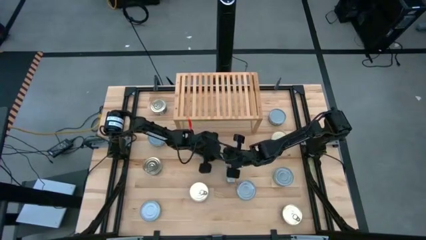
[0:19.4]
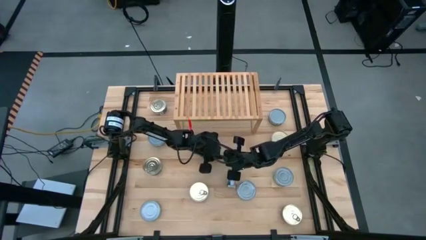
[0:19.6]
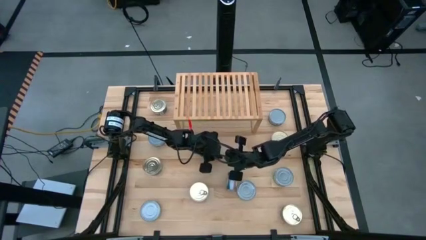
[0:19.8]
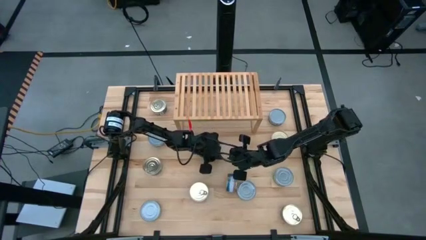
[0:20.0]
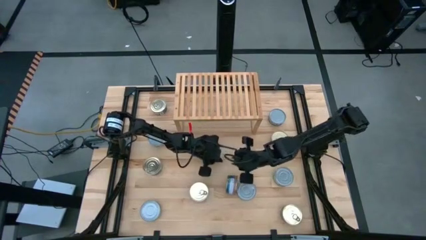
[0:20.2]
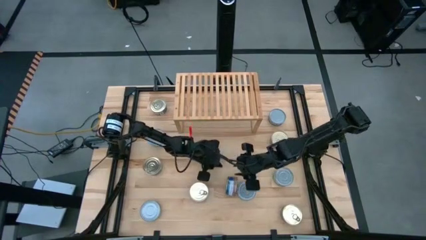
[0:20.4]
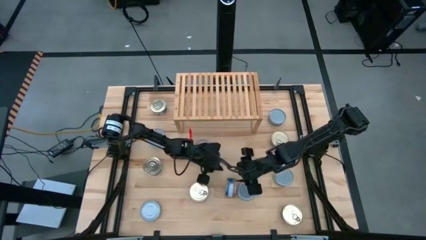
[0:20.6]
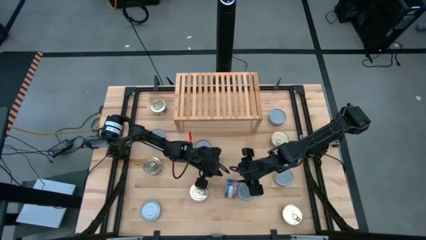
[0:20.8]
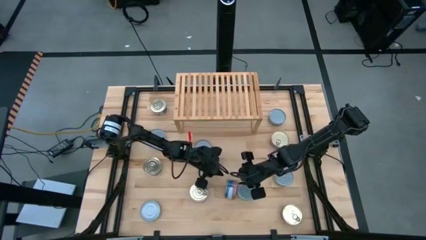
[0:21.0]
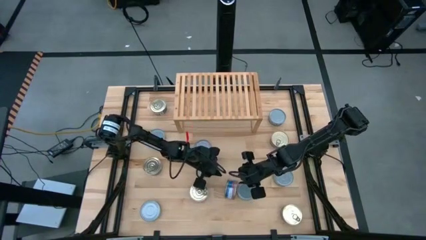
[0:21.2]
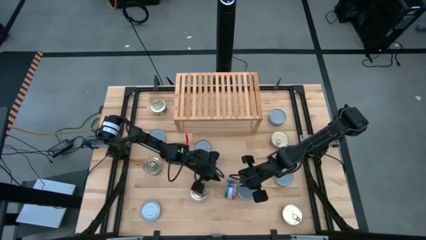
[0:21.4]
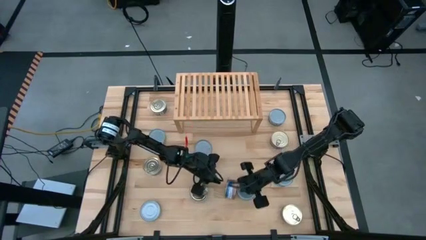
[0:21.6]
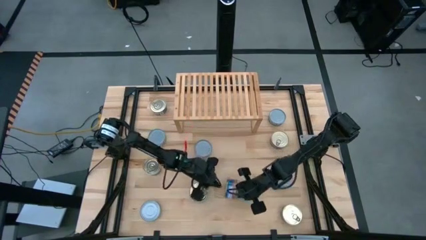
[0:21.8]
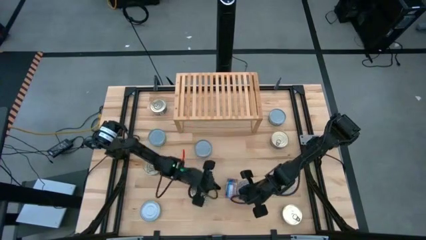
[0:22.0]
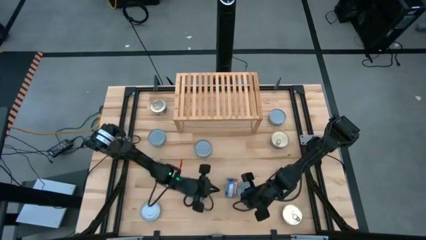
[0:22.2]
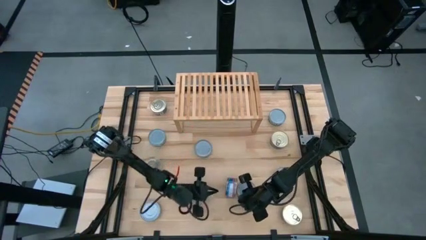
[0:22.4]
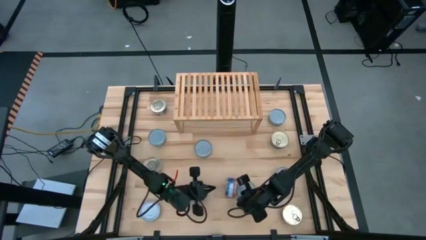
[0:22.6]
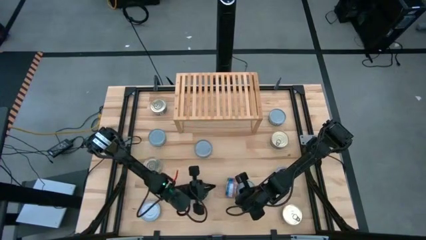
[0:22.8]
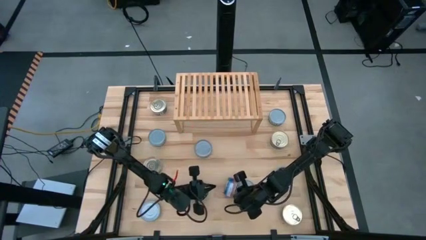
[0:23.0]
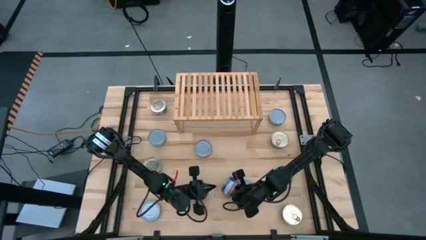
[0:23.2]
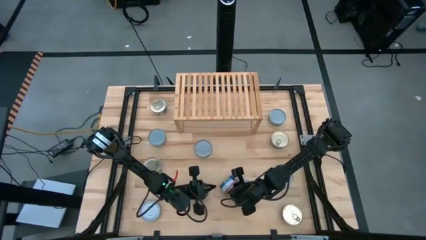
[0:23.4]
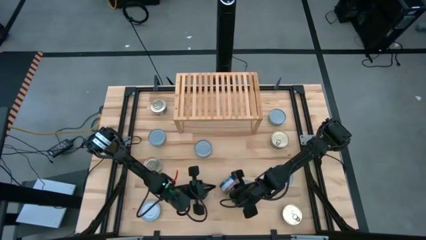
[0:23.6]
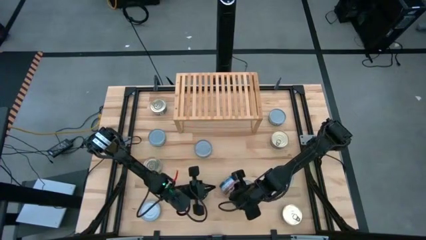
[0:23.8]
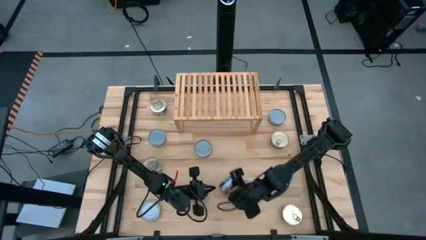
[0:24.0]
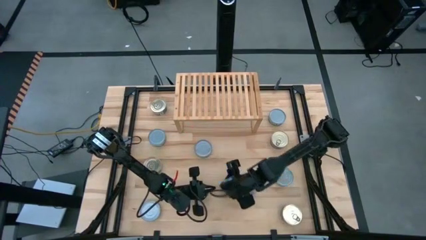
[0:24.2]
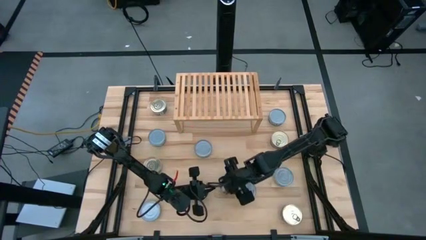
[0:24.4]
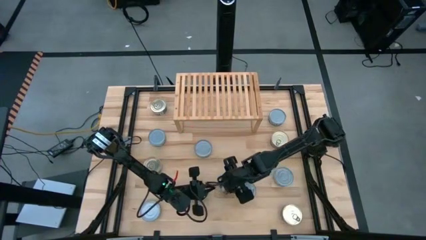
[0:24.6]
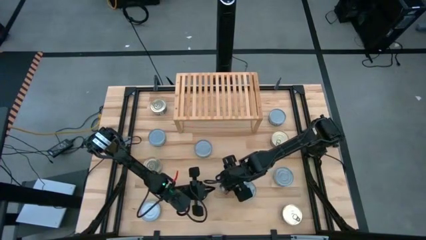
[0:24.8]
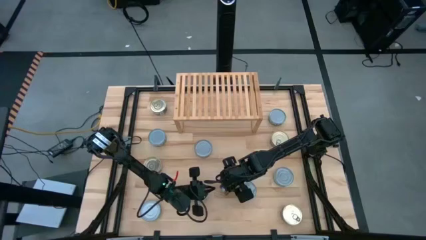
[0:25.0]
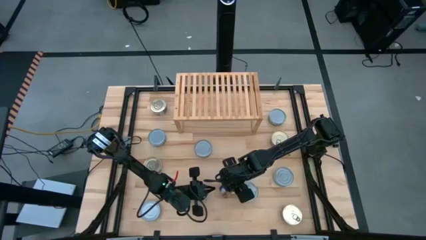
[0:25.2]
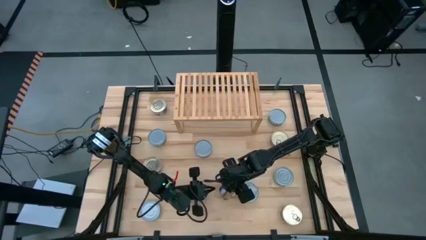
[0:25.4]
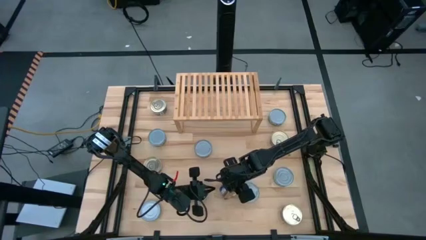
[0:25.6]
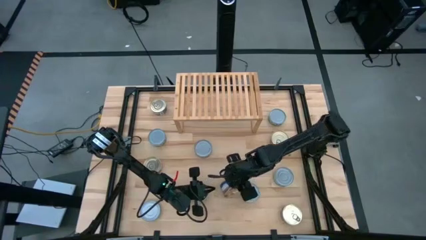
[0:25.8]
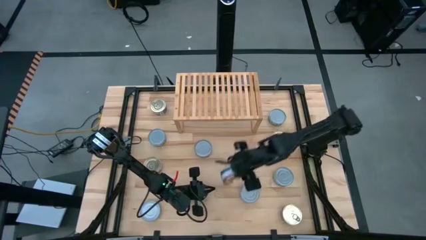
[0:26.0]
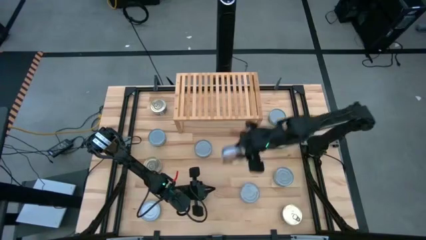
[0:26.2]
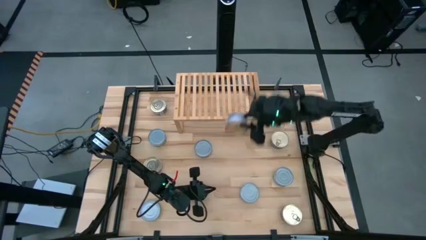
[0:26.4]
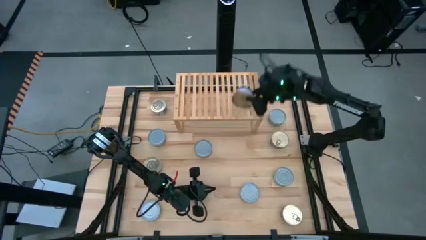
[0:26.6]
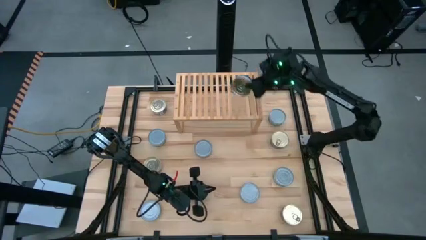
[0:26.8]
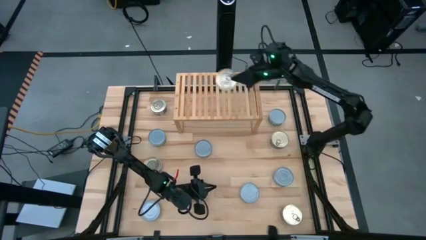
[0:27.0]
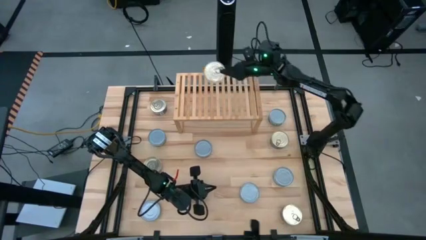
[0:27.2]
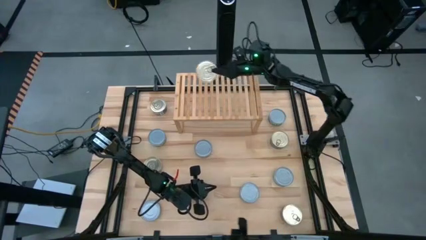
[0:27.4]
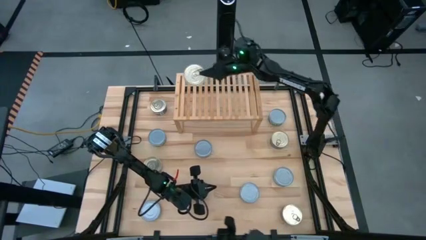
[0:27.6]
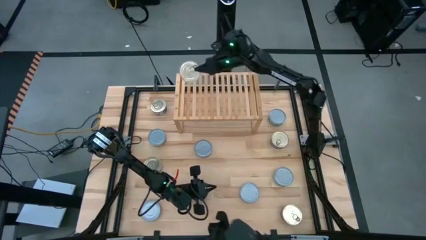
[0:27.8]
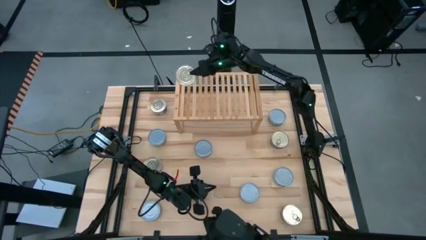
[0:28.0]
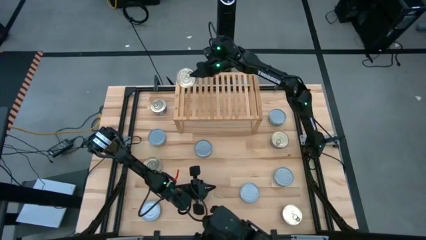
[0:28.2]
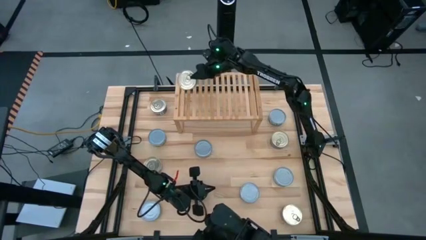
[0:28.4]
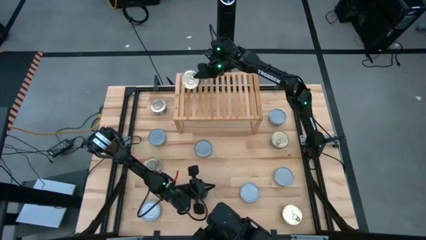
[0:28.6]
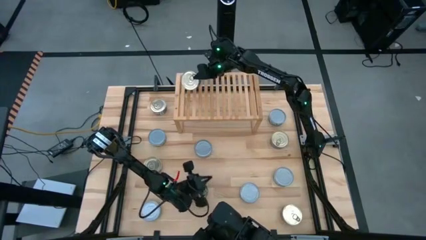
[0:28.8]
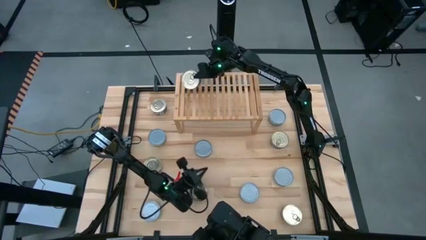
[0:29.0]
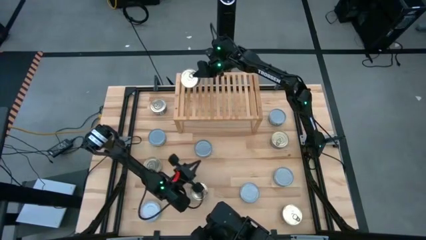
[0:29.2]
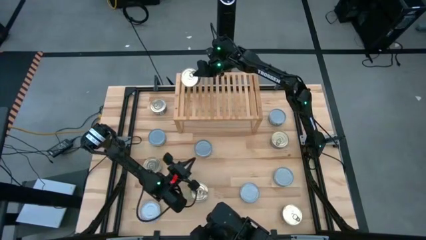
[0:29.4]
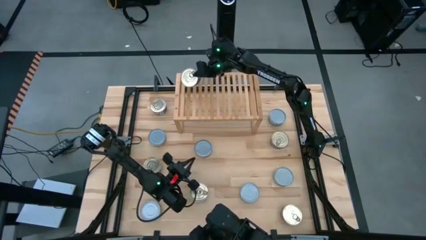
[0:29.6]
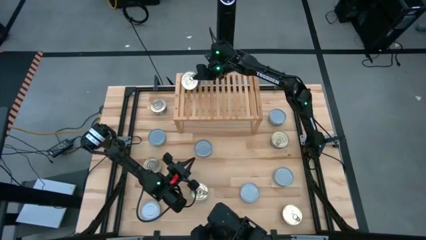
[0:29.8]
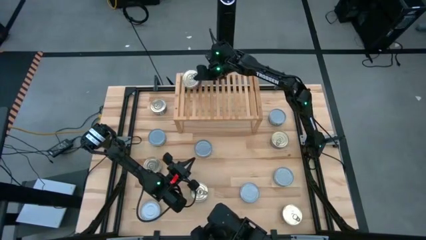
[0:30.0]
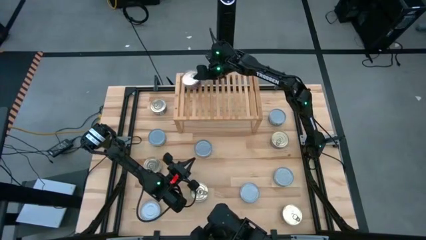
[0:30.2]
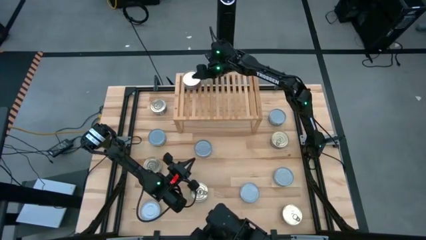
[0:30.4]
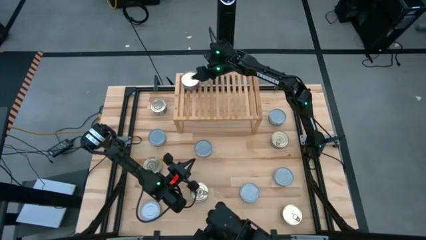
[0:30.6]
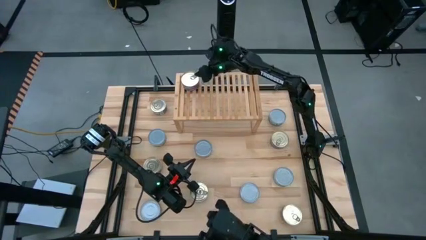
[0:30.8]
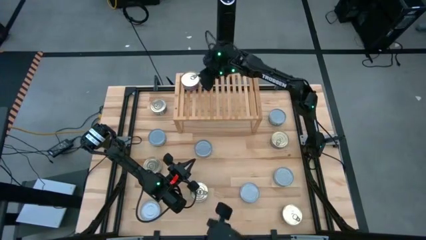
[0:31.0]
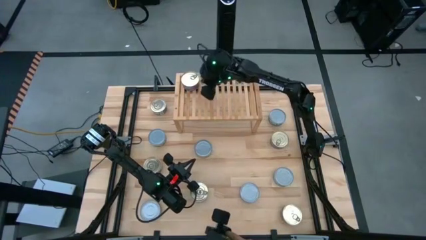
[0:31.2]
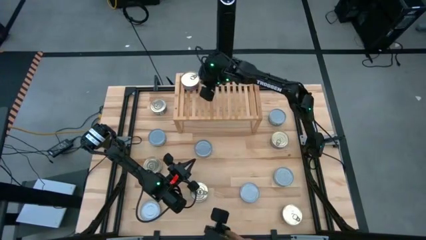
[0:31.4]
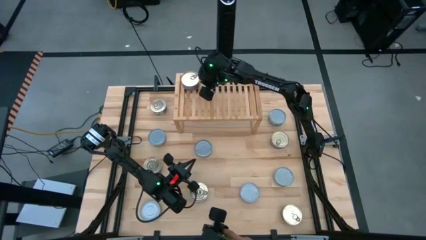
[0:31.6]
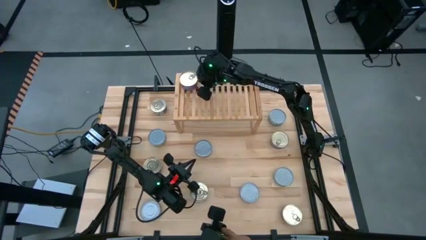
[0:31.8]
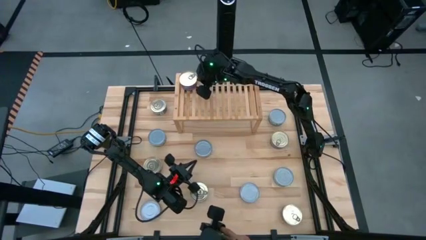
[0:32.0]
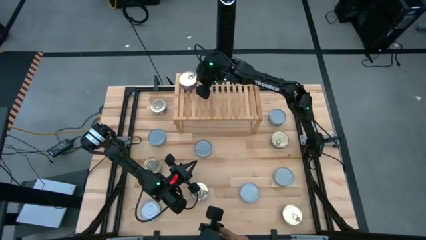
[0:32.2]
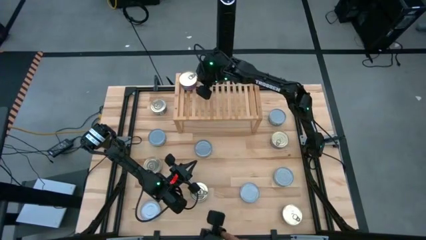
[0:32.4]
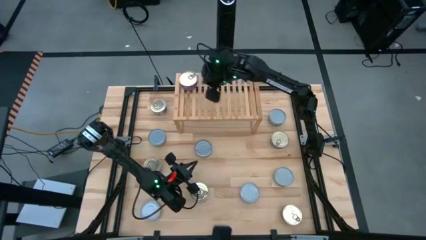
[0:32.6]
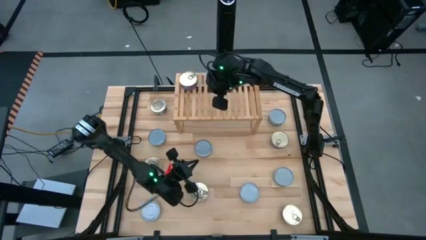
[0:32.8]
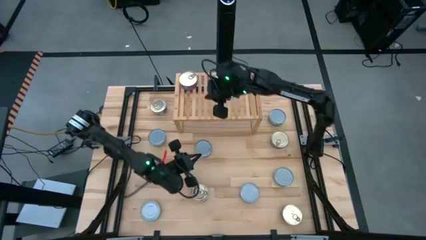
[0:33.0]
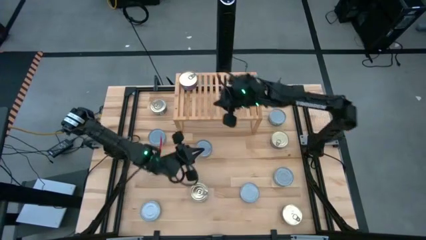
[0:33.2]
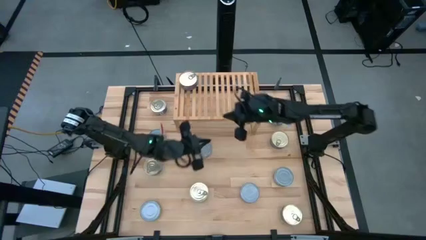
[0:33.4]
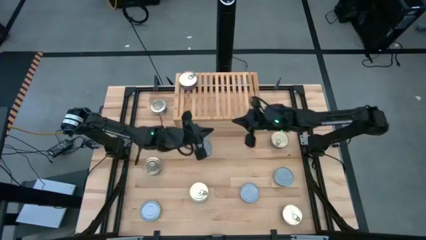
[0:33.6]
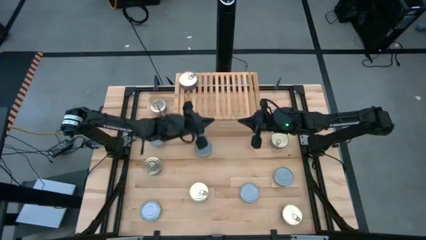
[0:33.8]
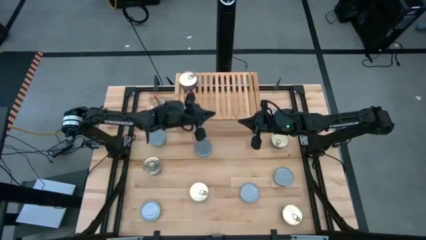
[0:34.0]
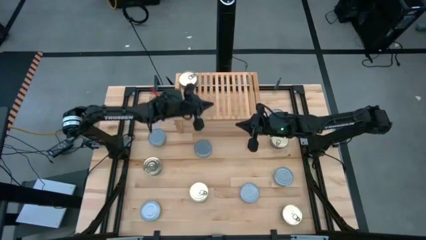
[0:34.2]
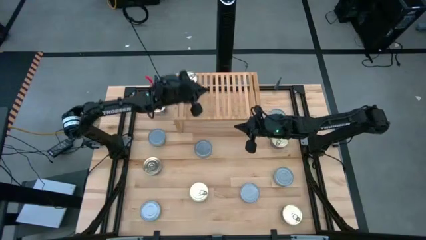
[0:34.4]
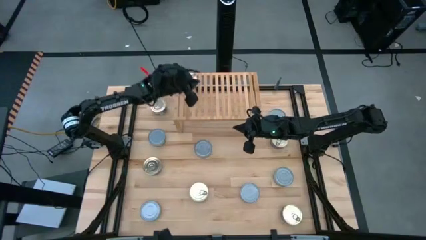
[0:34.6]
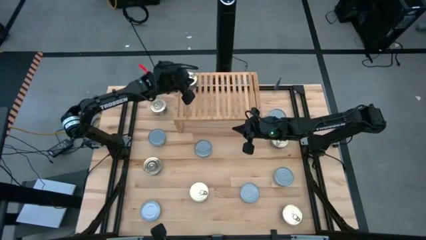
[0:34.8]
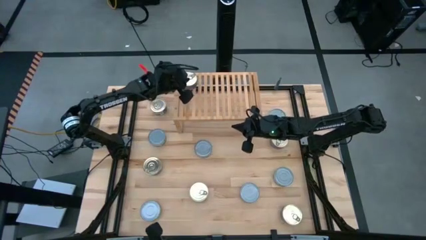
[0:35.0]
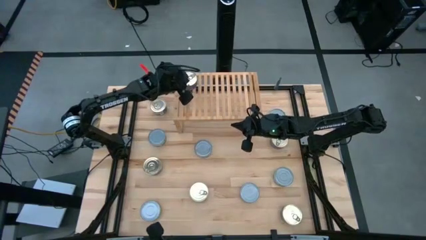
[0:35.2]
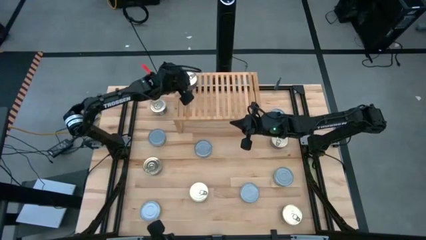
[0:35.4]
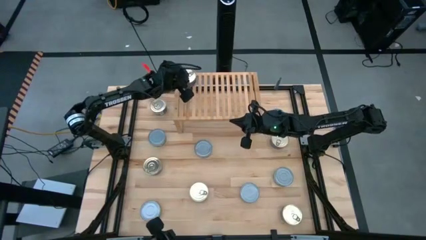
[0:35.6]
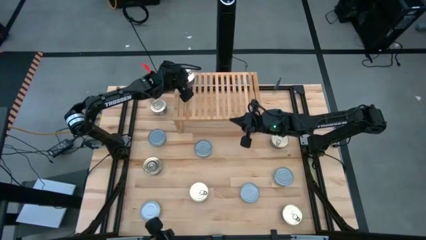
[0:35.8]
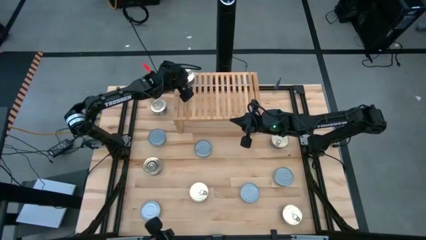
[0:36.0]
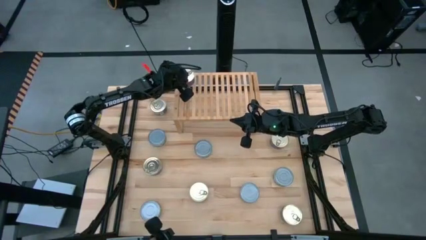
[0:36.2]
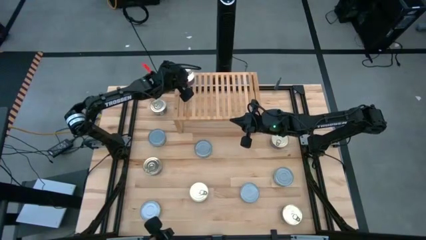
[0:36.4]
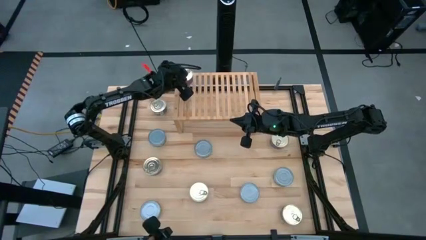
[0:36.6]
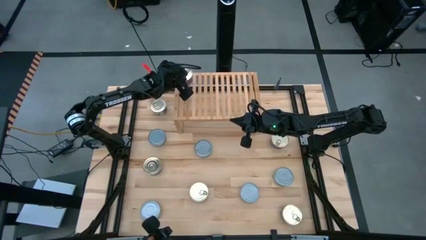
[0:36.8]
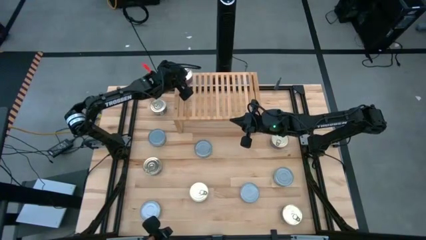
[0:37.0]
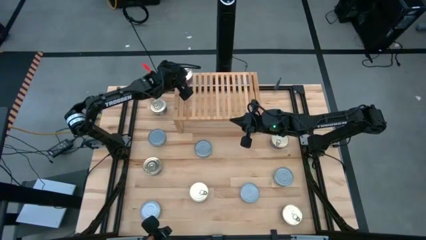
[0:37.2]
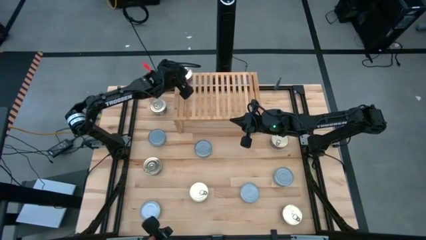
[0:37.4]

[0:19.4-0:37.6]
Task: Stack canned seafood by type on shelf
Put the blue-pink tuna can on the shelf
